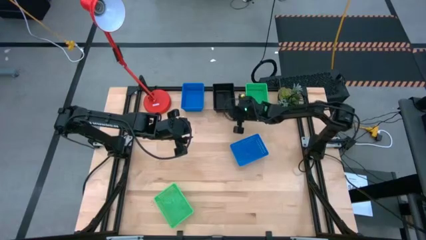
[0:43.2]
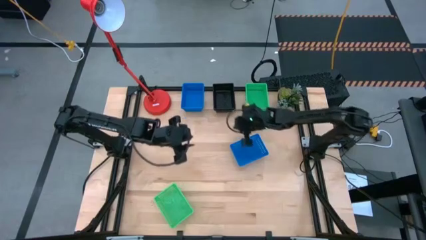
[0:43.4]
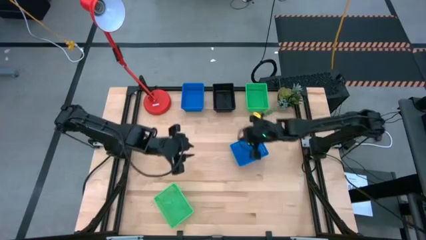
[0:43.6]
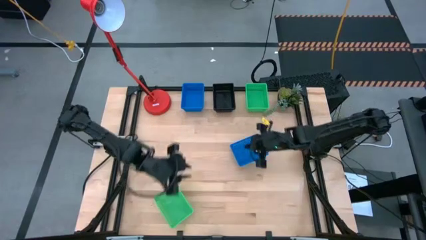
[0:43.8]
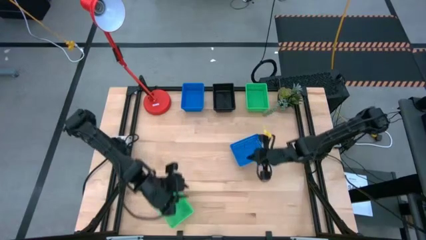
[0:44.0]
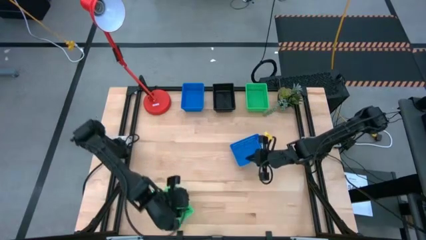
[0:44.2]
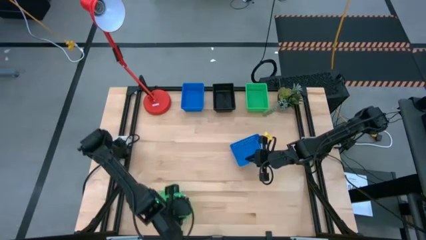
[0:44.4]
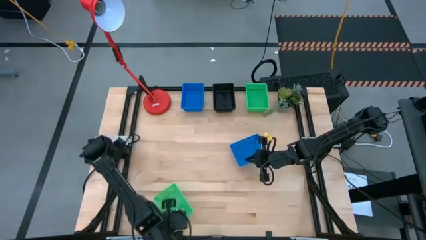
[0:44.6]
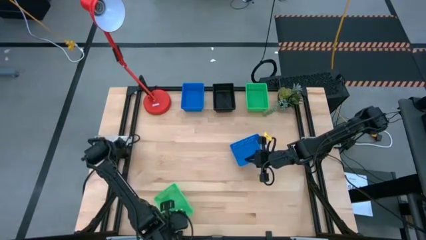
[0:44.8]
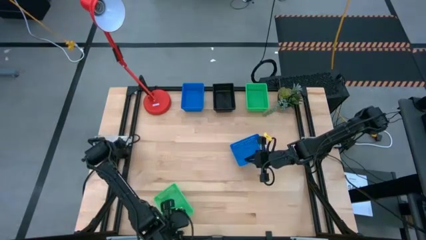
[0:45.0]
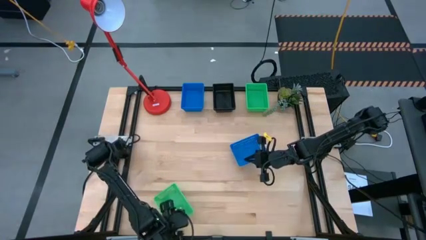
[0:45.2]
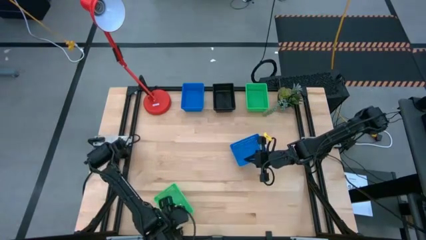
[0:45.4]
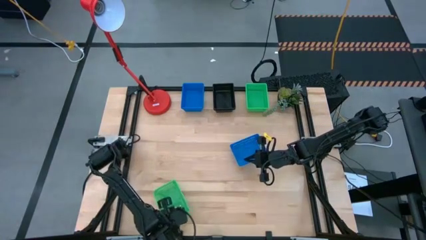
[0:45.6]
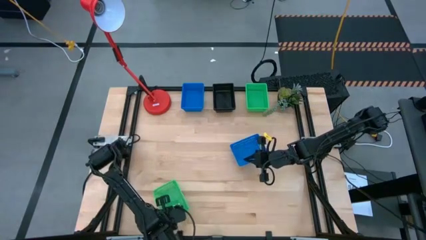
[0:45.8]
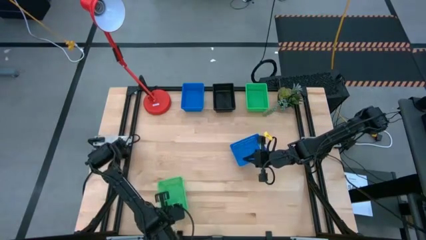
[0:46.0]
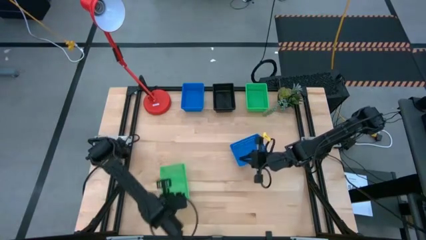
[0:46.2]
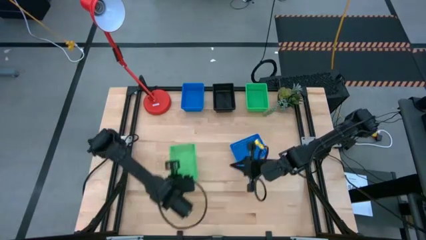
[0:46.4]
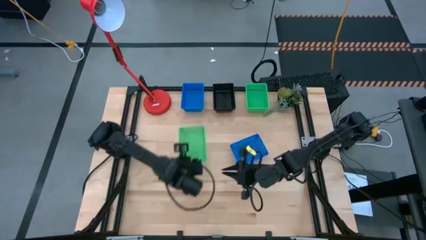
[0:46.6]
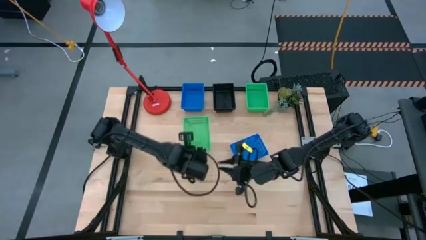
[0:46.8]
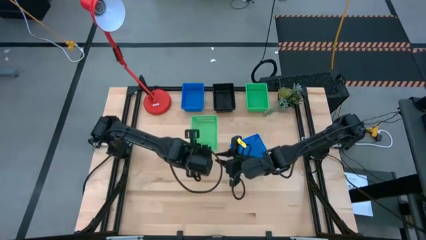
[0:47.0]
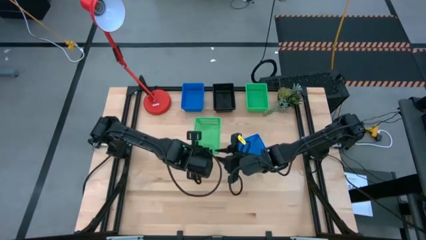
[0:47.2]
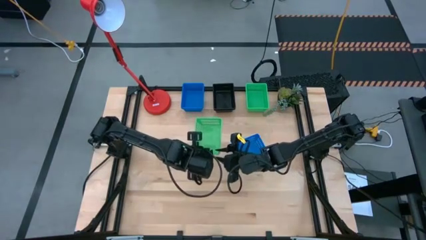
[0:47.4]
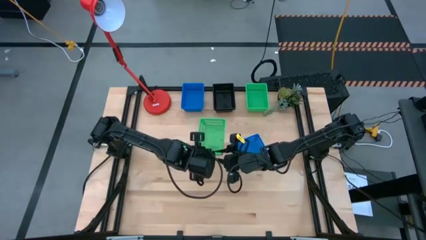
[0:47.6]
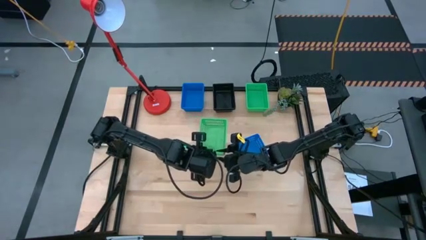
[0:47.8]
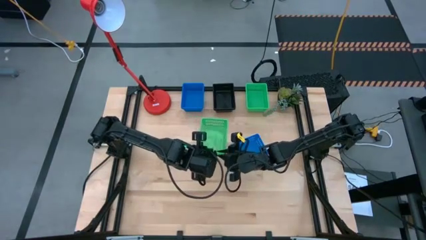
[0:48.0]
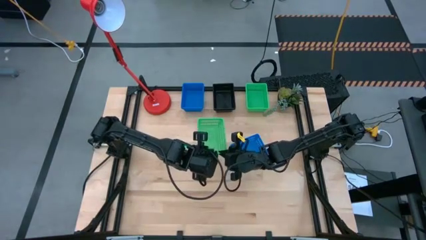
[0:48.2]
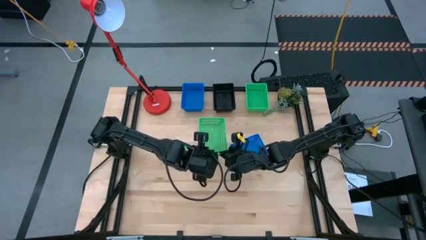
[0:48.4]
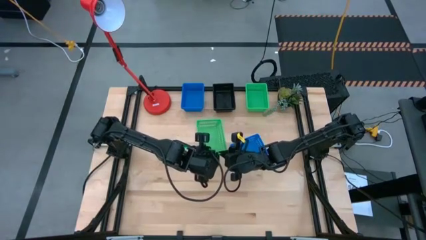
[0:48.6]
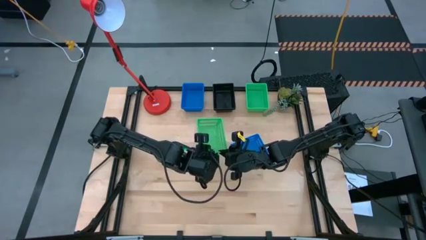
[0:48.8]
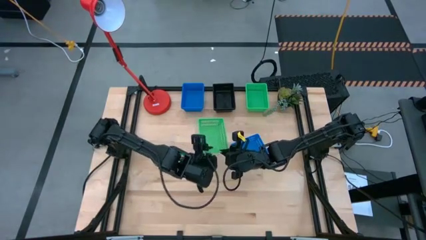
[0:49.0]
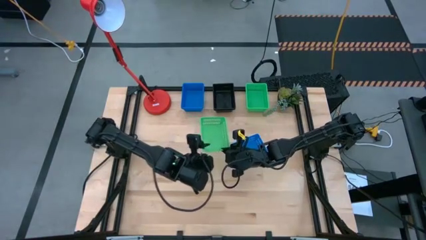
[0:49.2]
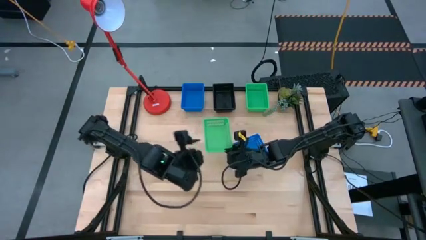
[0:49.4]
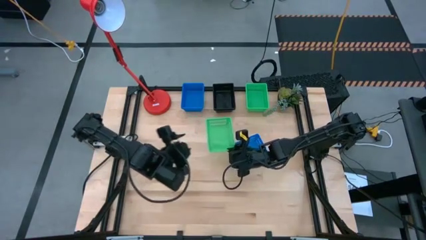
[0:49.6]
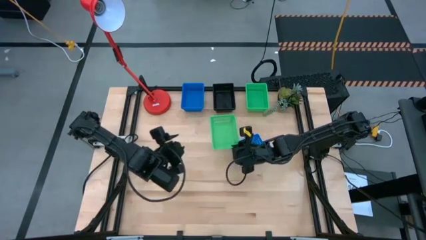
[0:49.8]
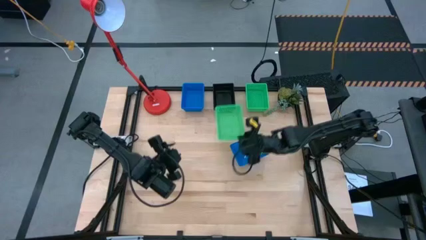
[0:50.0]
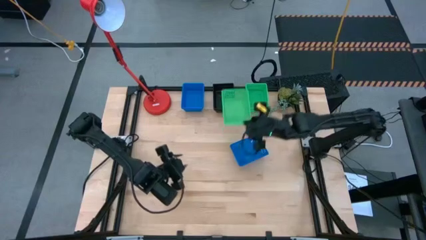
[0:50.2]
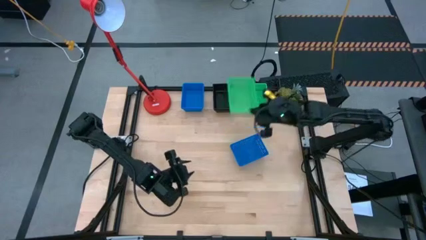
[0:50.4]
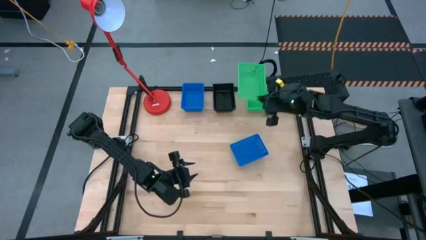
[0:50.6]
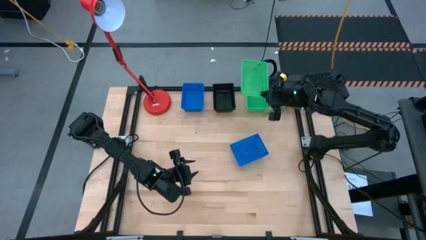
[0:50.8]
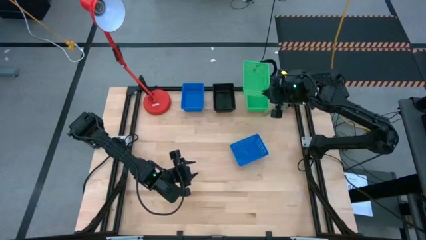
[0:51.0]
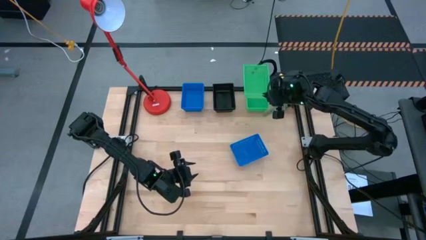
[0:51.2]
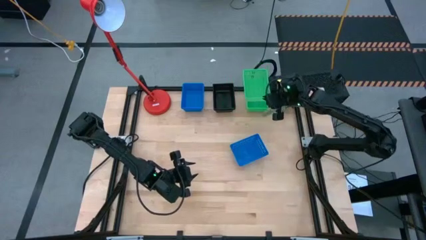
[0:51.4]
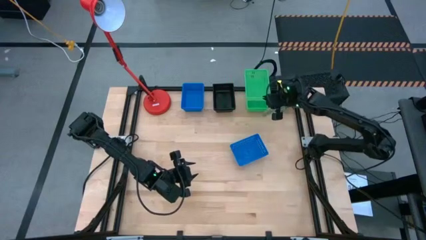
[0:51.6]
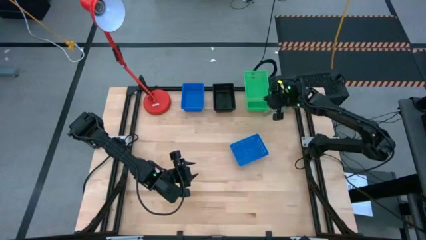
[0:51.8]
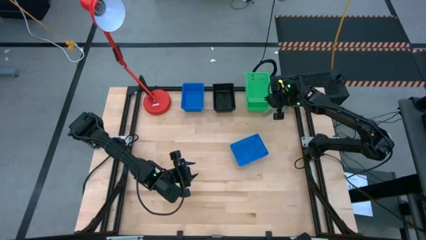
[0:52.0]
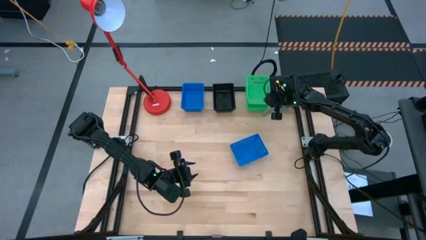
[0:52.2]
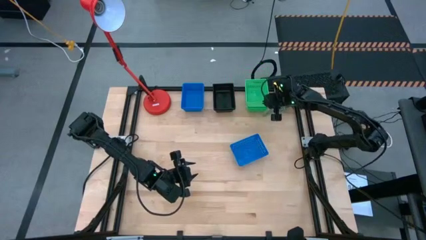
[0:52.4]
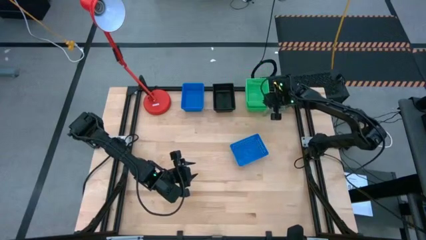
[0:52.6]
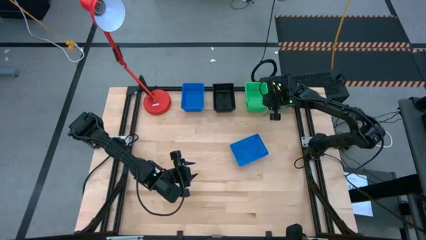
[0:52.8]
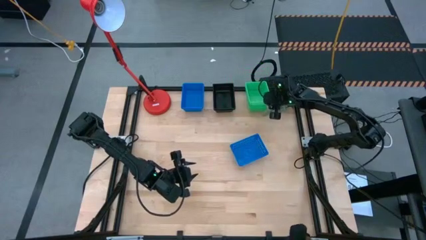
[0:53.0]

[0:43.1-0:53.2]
Stack the bottom green basket on top of the green baskets

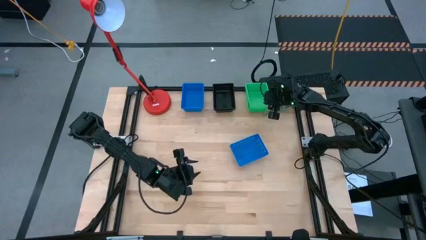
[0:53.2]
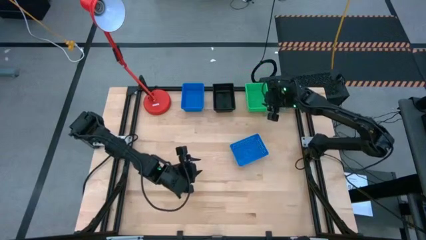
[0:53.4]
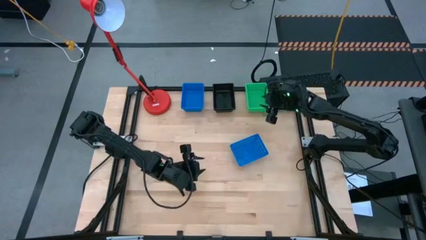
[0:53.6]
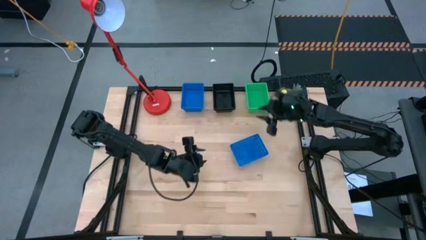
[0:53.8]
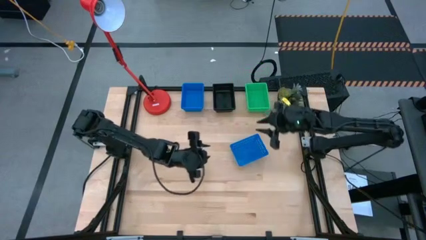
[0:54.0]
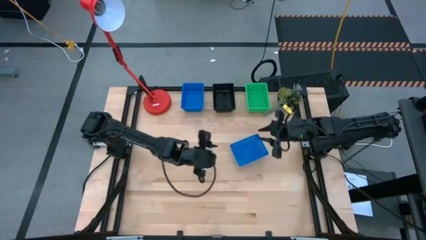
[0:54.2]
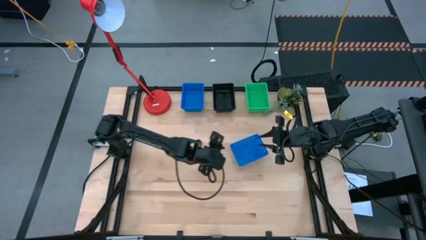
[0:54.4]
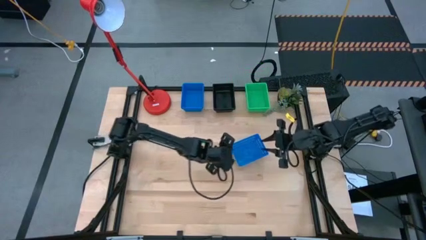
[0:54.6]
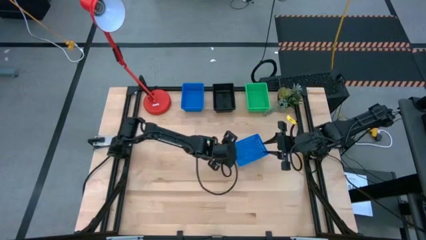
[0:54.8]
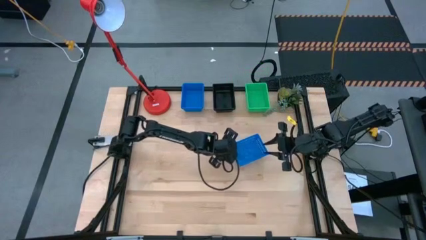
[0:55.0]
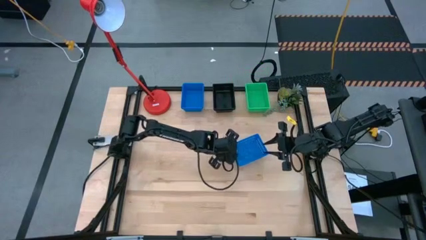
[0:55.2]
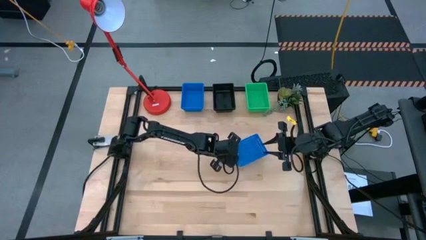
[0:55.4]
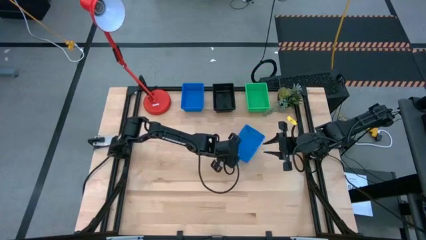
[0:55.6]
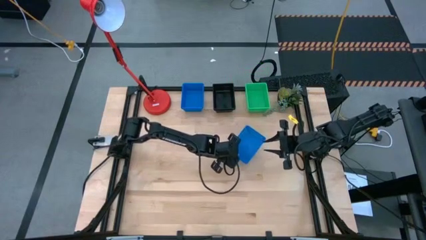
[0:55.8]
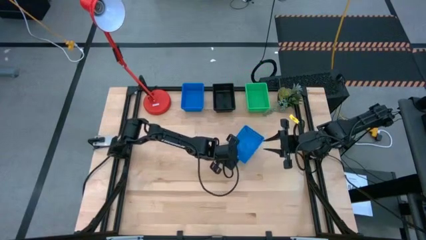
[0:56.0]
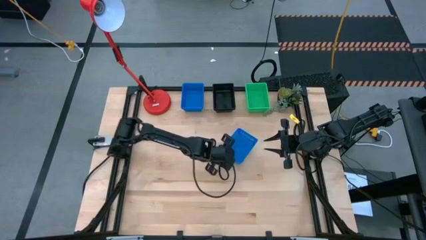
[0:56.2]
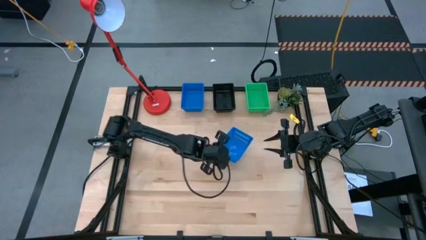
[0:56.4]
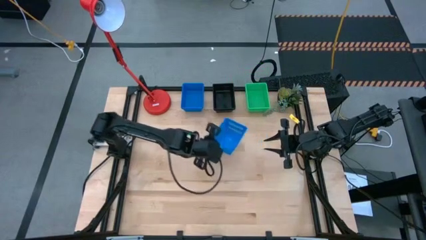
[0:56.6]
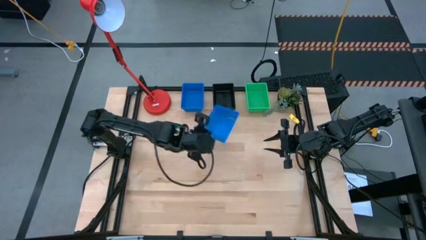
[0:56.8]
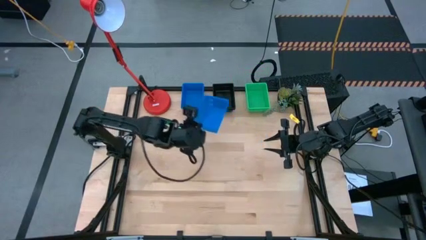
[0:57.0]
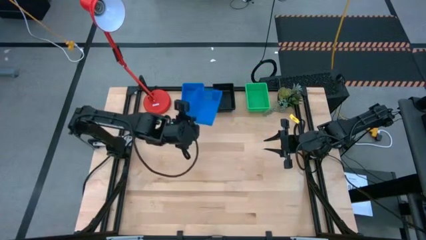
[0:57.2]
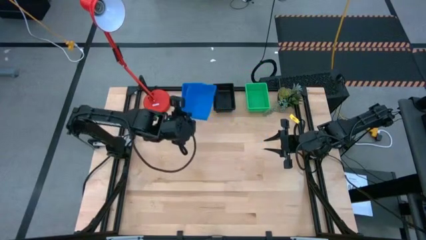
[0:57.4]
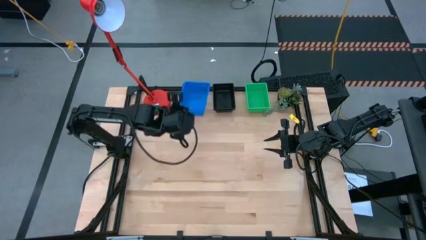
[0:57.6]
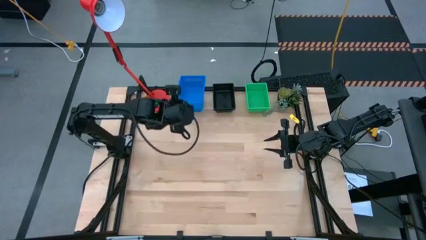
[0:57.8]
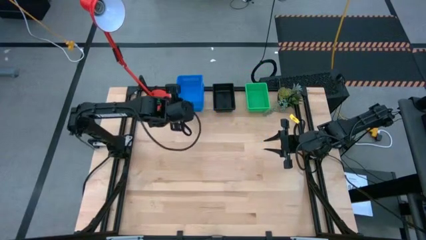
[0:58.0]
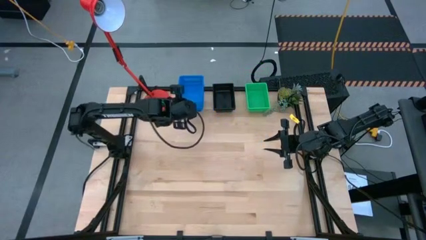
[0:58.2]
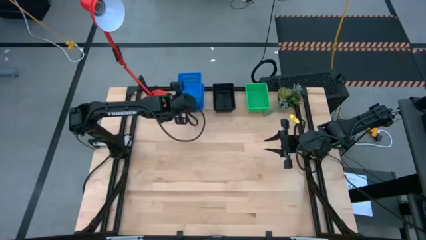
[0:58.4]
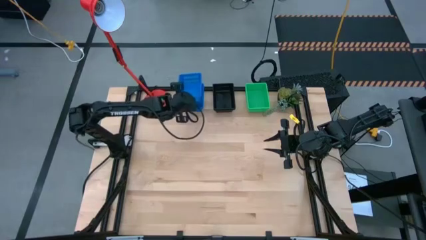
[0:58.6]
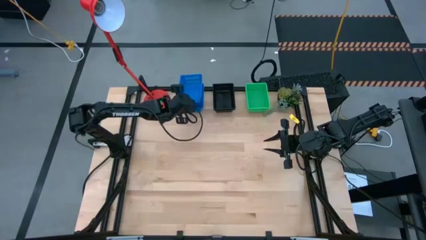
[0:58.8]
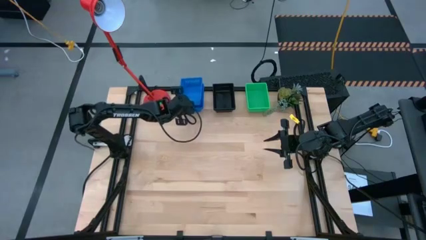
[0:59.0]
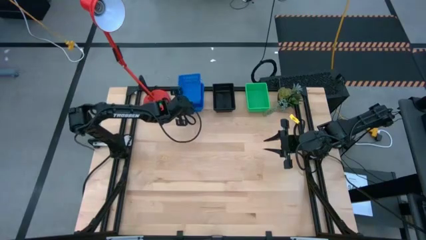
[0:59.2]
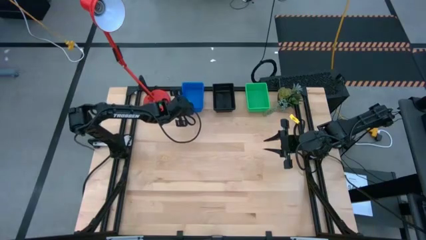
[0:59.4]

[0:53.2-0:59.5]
Stack the bottom blue basket on top of the blue baskets
